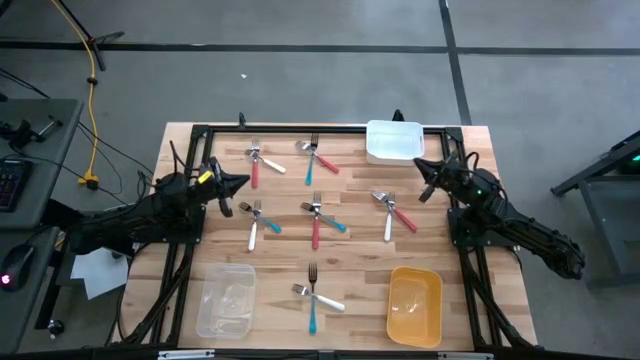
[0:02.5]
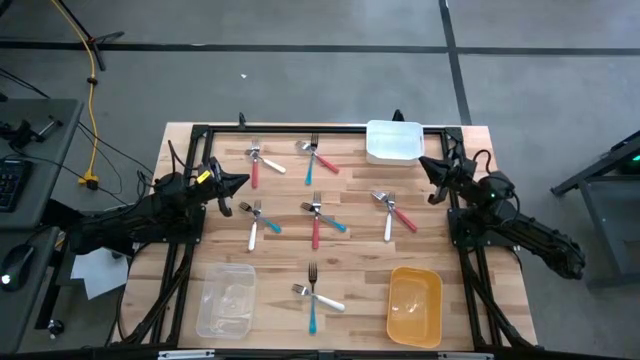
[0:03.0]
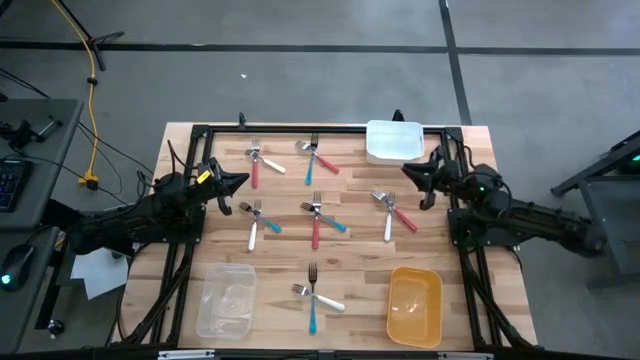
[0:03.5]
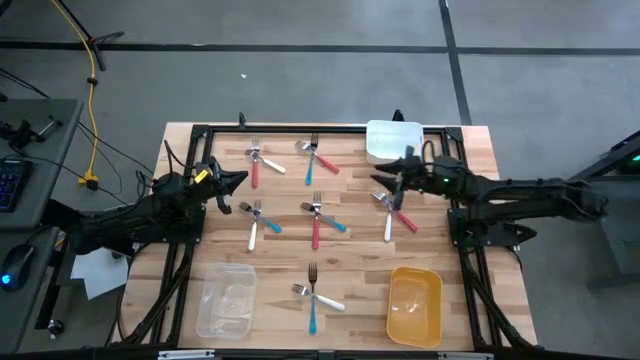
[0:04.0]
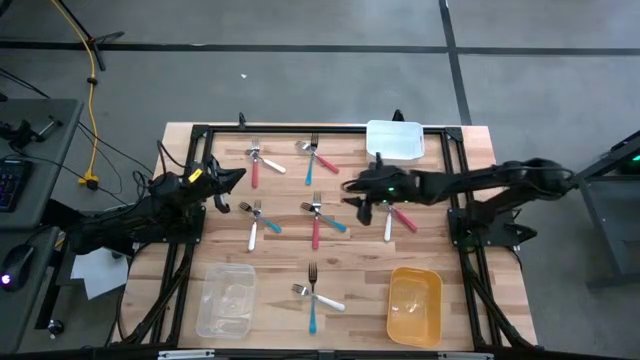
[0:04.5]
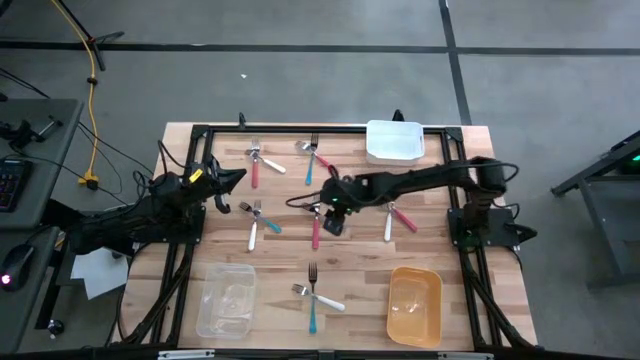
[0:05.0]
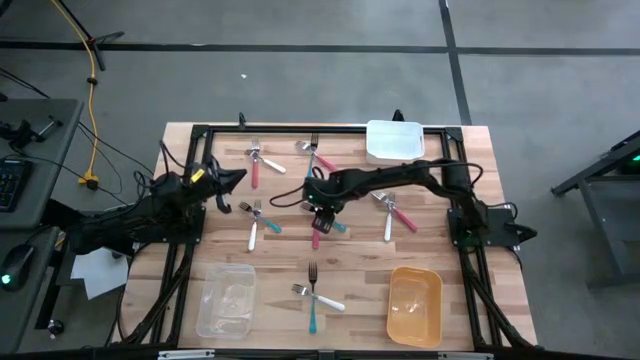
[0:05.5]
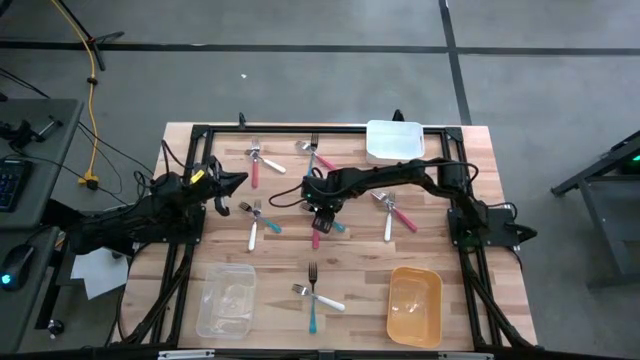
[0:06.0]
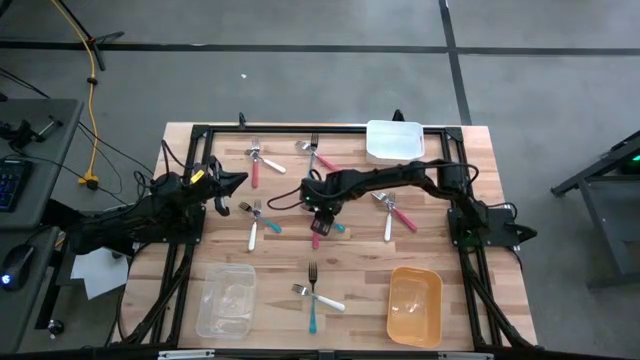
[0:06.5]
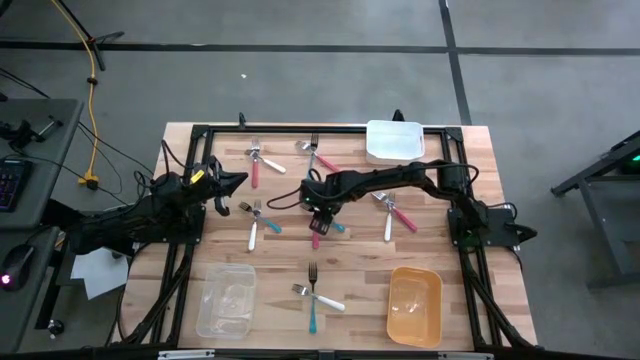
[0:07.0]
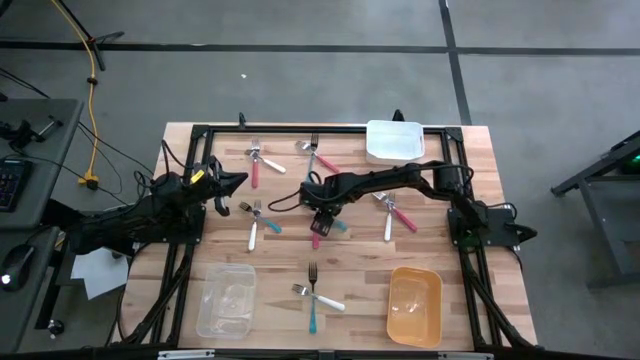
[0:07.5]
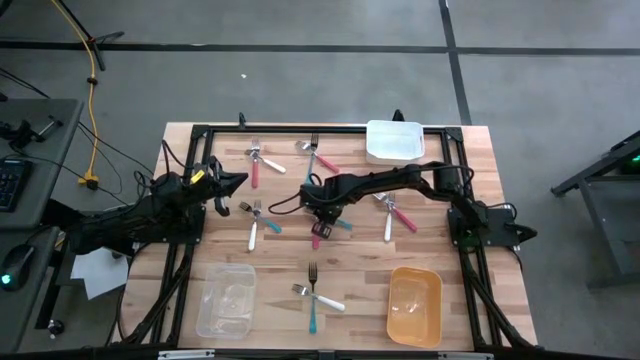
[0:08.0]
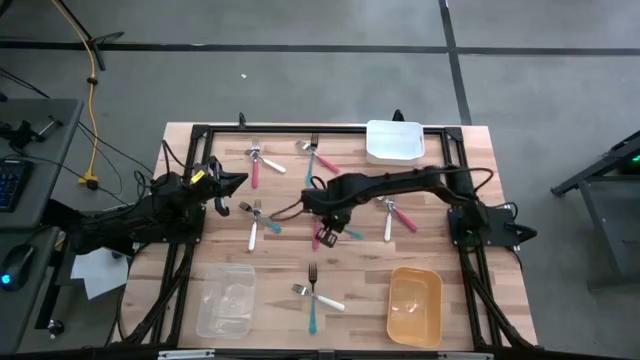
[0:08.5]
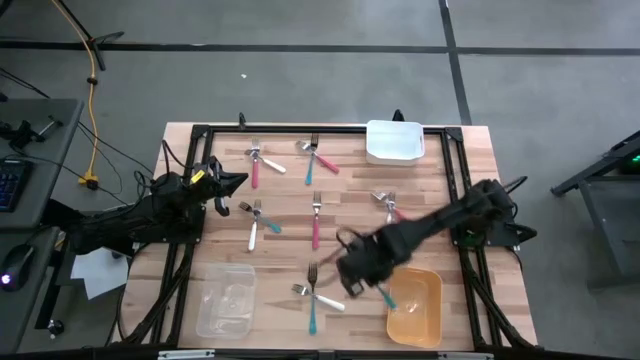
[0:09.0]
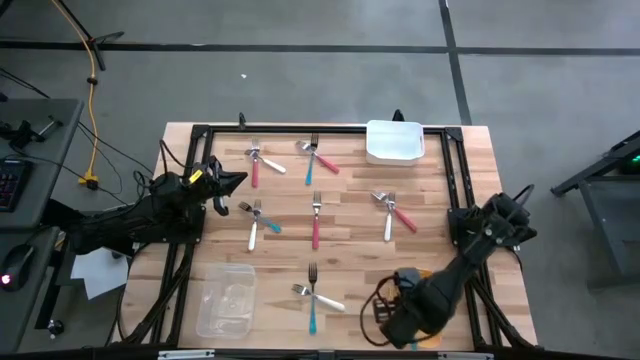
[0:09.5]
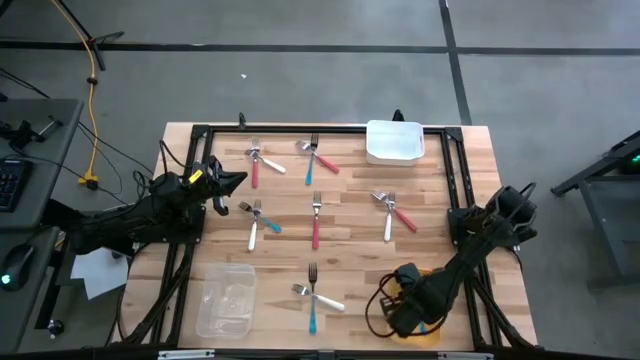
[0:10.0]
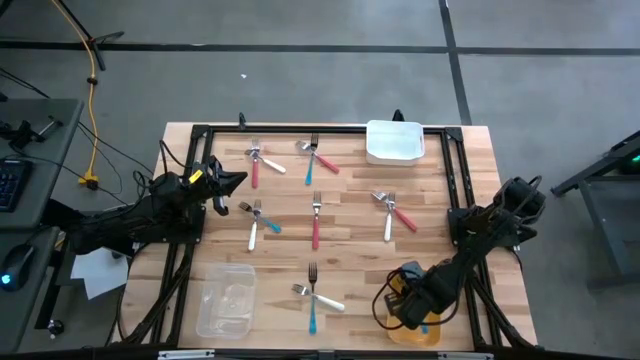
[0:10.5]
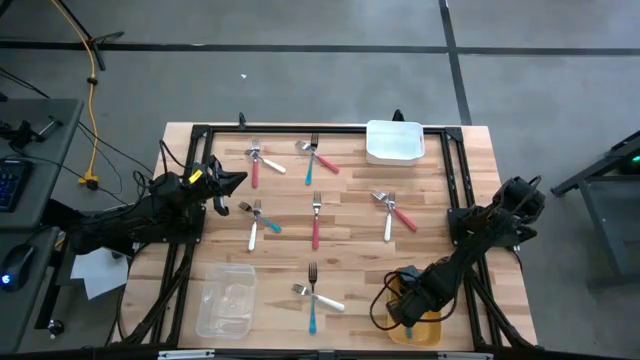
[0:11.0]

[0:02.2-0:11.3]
Task: Sort silverware by color (type)
Put the center blue fork into the yellow bin

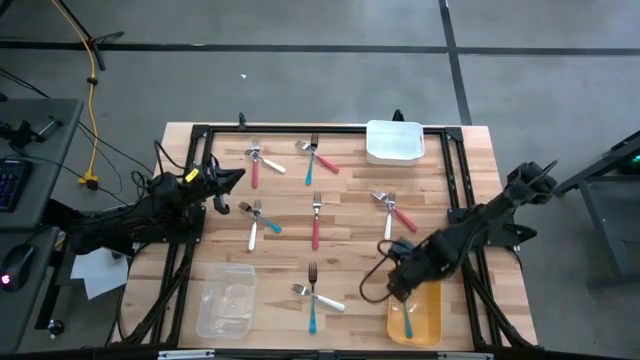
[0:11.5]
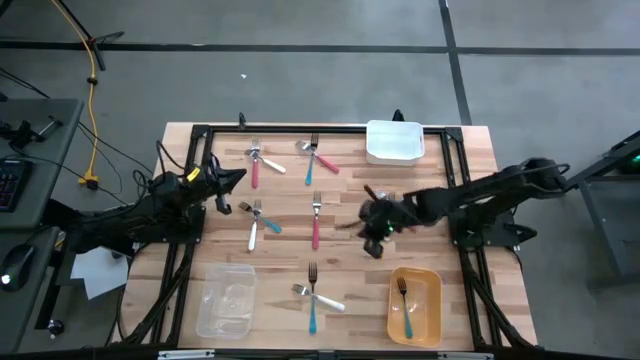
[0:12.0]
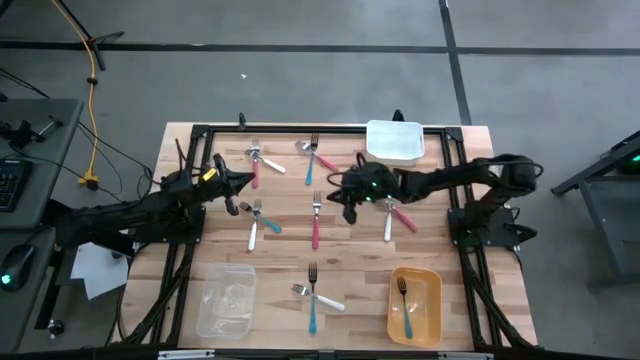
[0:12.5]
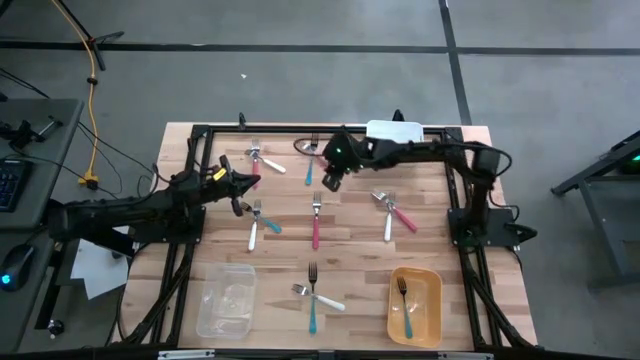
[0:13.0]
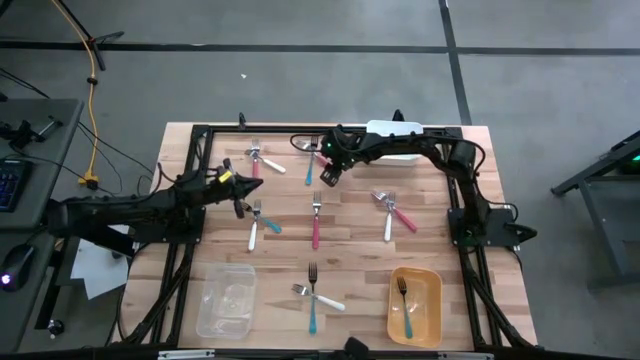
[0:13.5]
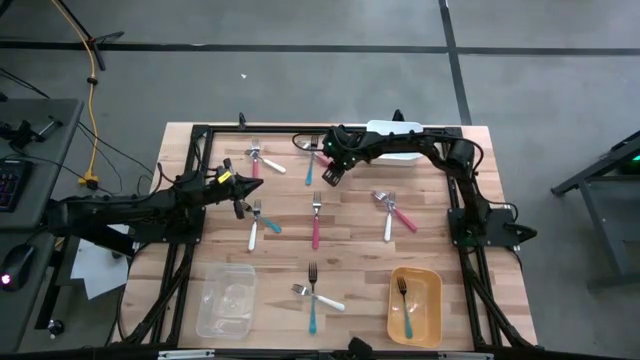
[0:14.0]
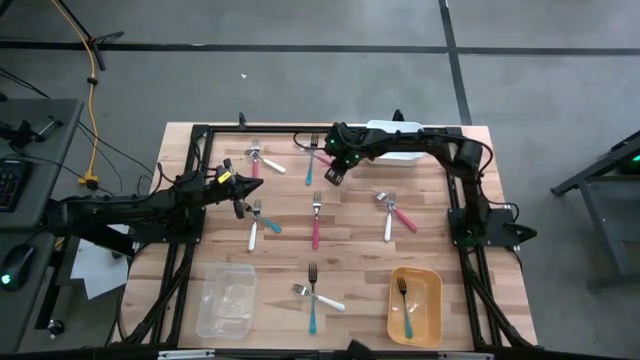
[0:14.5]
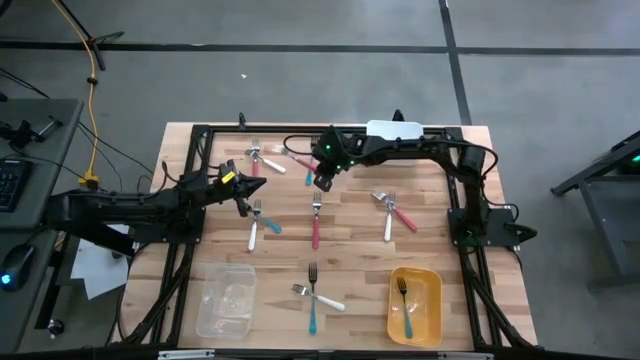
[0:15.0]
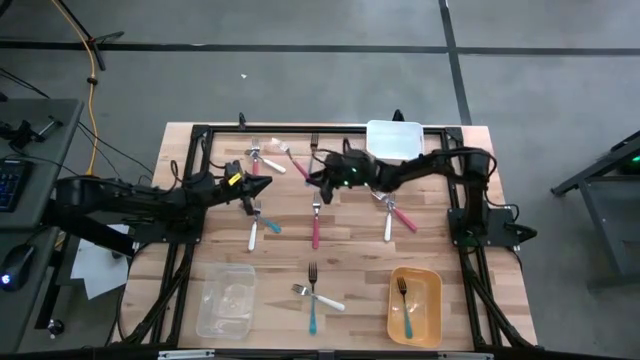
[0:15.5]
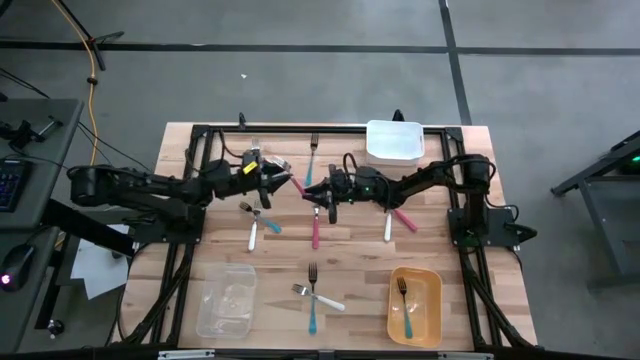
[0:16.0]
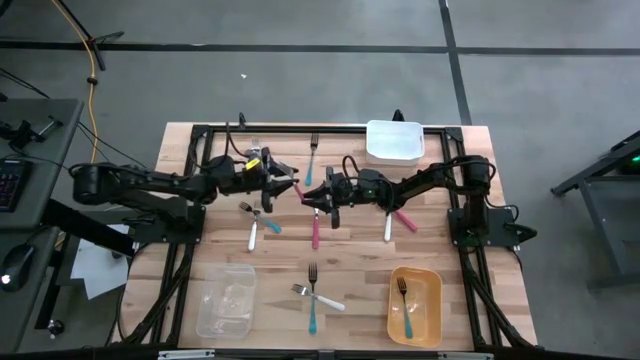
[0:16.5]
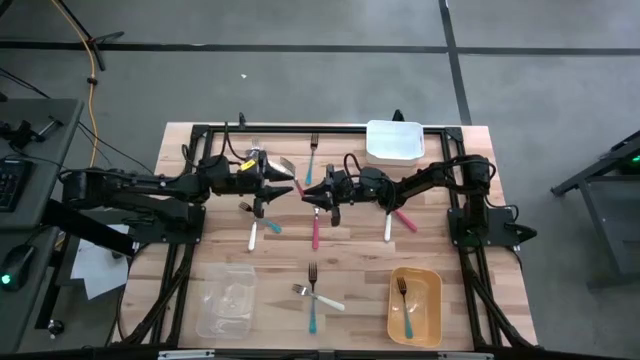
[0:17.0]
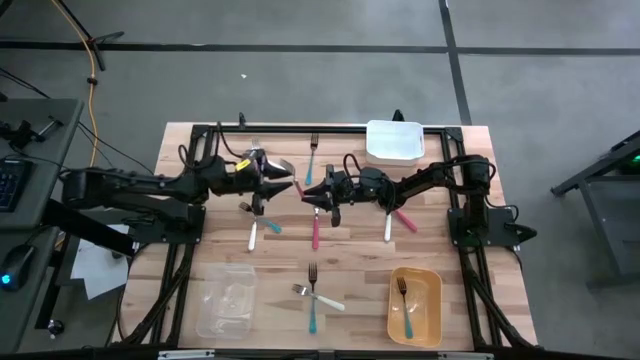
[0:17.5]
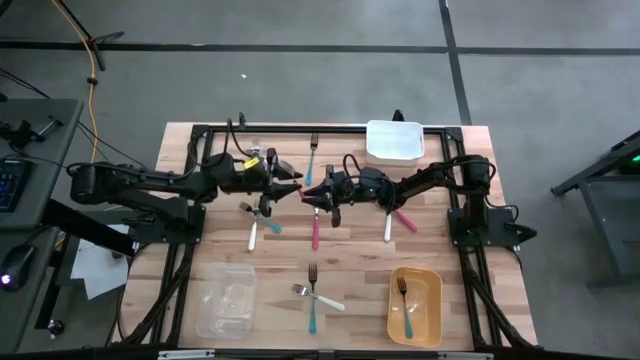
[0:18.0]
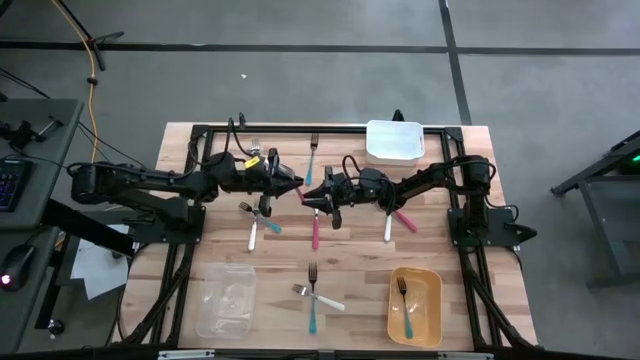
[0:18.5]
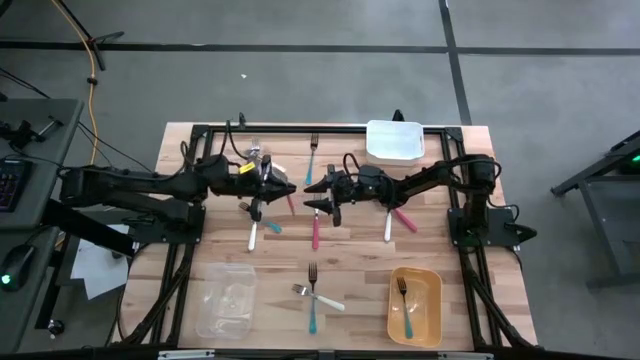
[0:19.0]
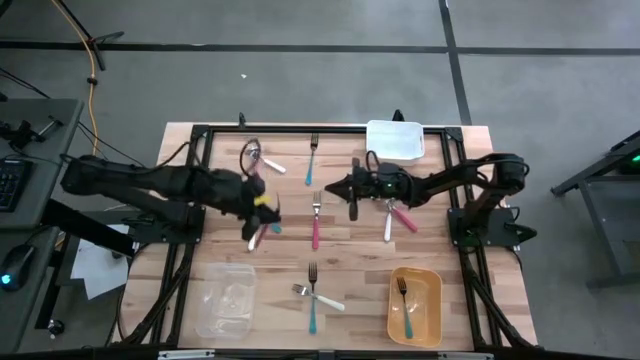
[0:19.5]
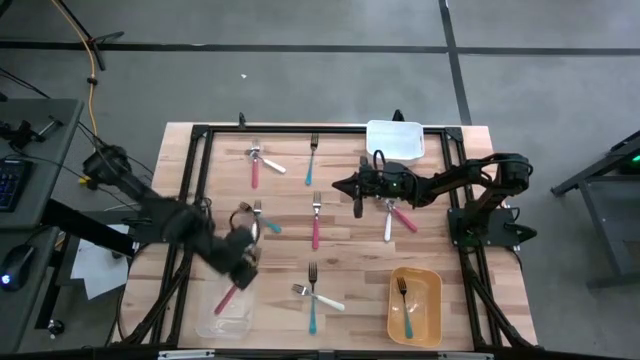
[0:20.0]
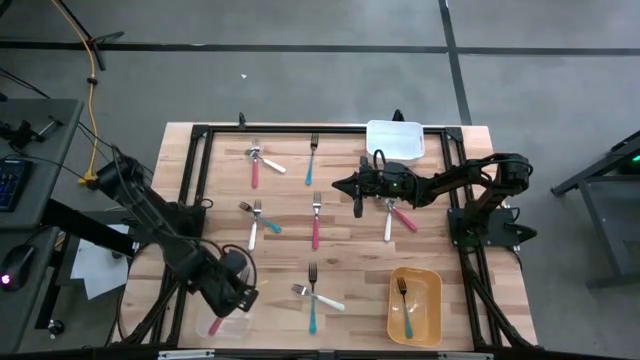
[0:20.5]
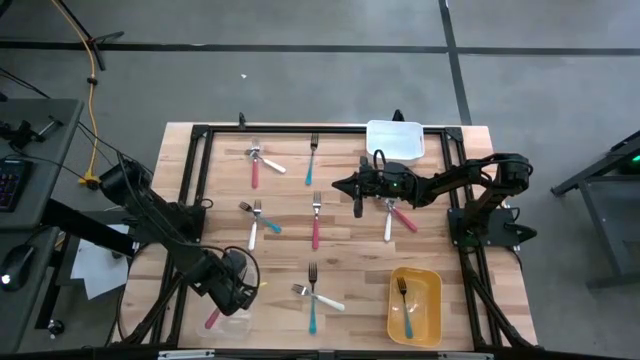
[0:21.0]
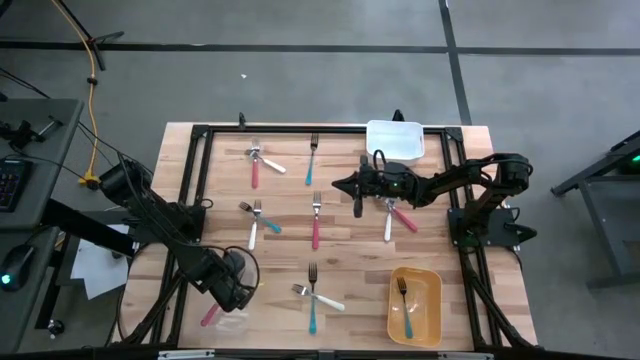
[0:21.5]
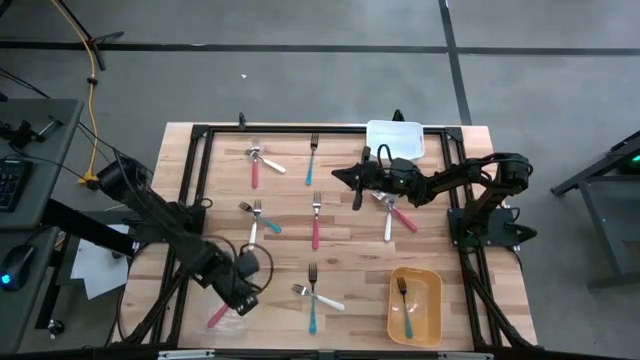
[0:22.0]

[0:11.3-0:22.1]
Put the top middle pink fork into the transparent bin

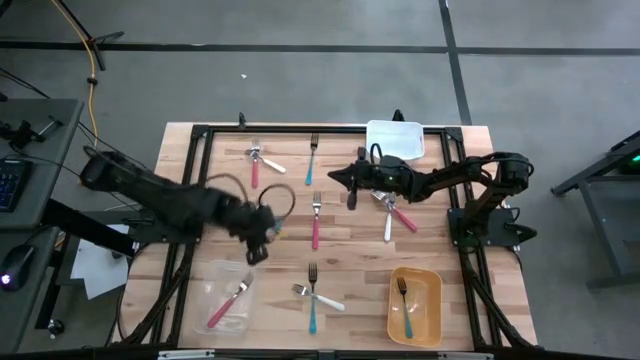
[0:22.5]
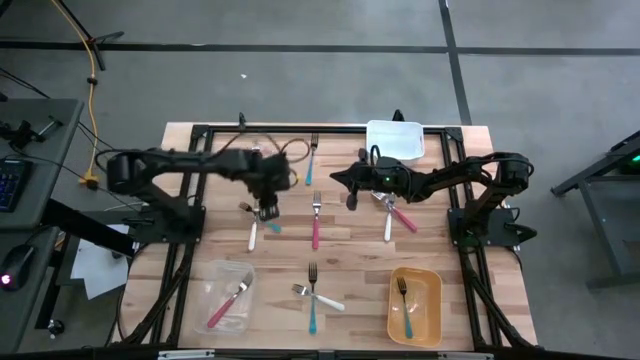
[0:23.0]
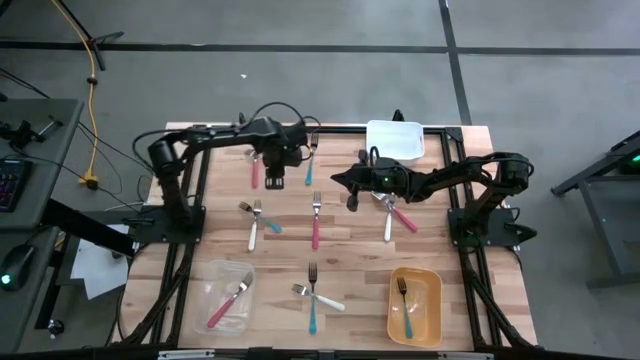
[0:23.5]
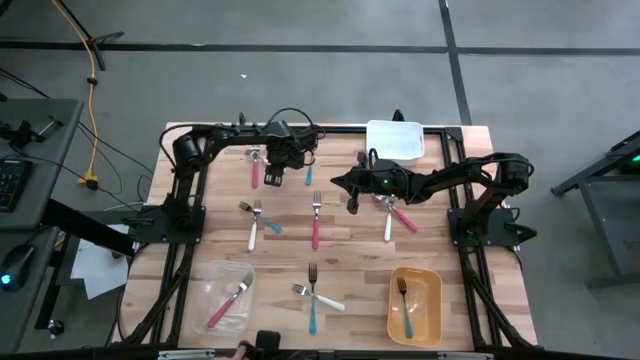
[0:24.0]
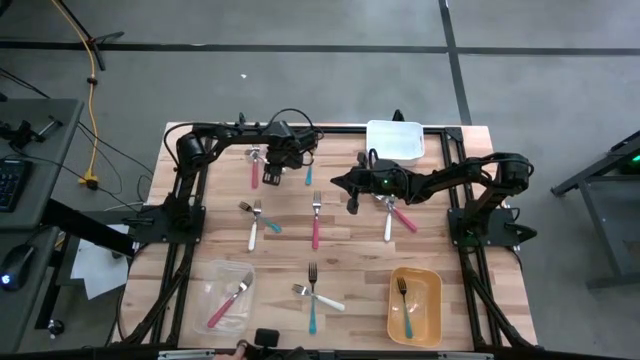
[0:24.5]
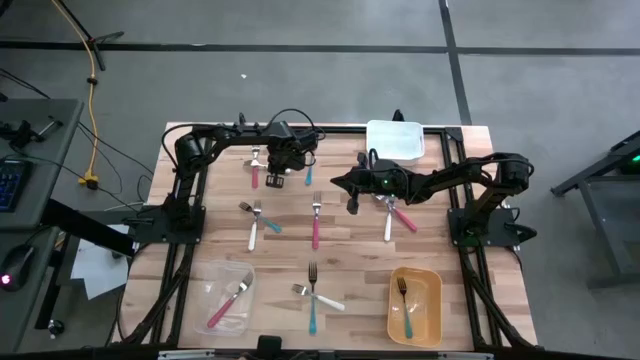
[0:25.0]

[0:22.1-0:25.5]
Put the top left white fork into the white bin
